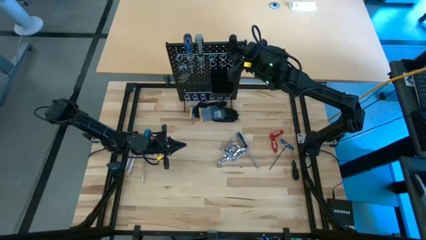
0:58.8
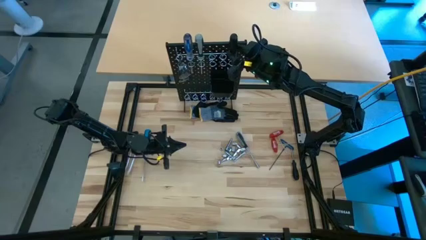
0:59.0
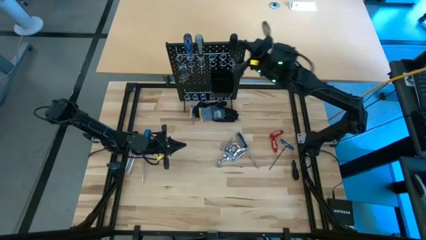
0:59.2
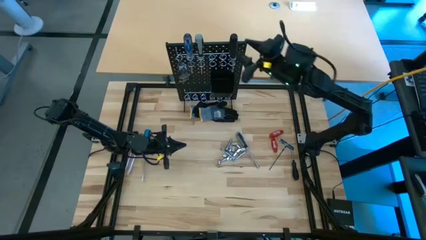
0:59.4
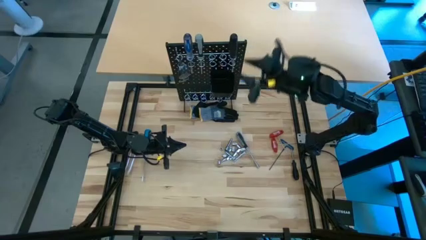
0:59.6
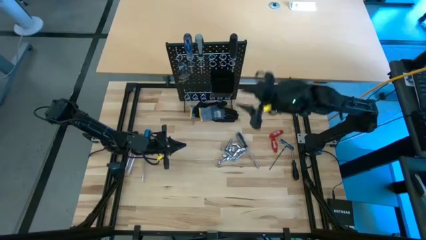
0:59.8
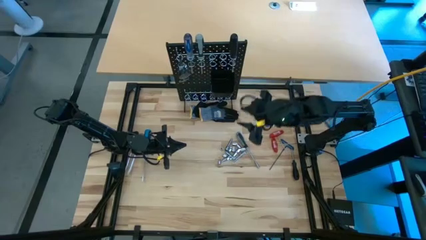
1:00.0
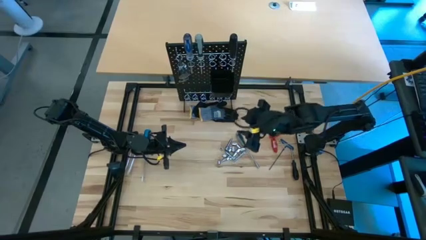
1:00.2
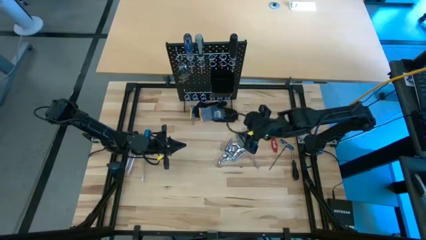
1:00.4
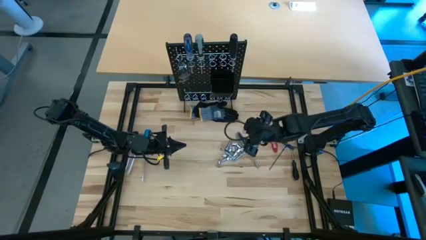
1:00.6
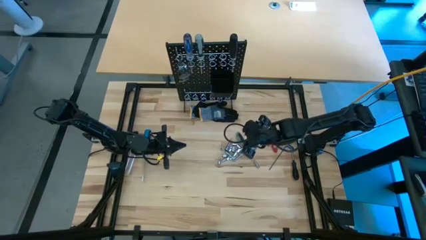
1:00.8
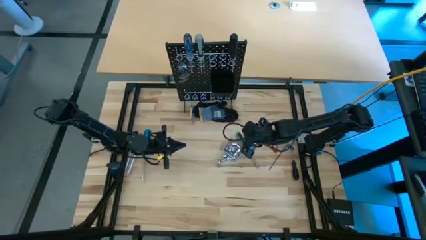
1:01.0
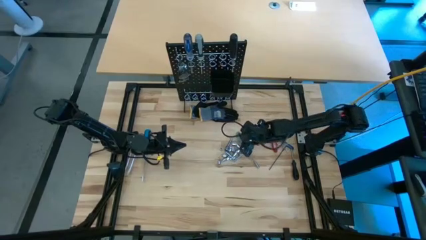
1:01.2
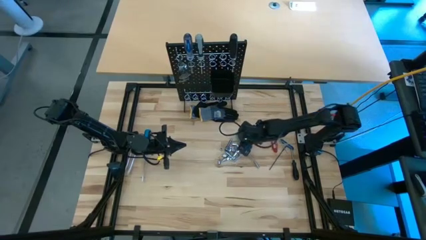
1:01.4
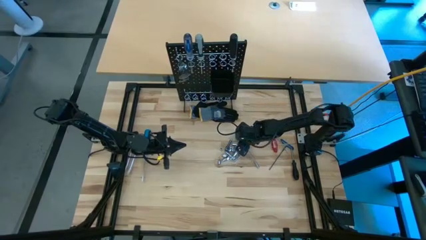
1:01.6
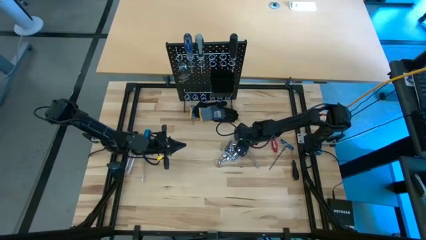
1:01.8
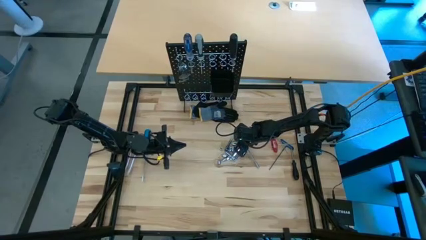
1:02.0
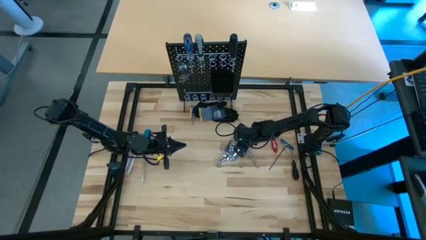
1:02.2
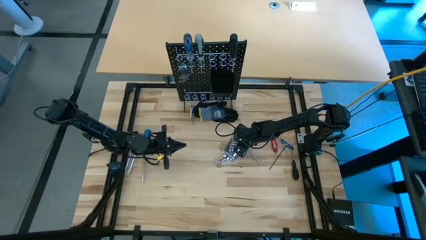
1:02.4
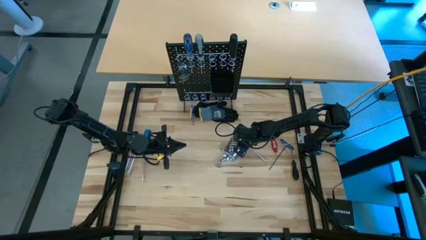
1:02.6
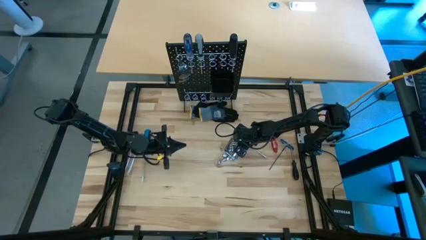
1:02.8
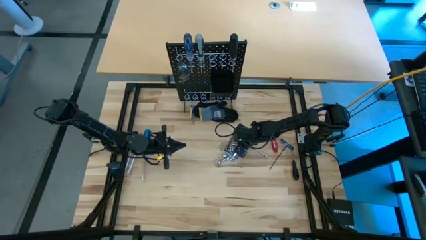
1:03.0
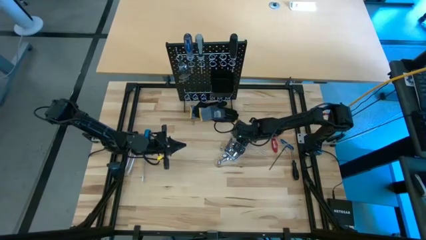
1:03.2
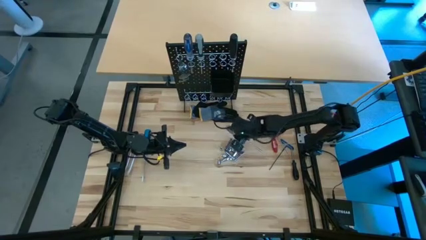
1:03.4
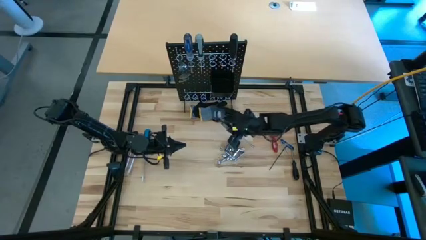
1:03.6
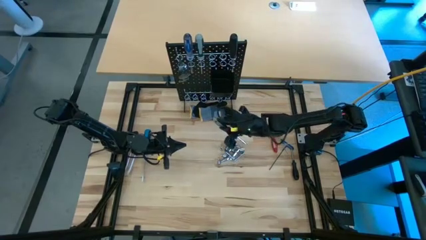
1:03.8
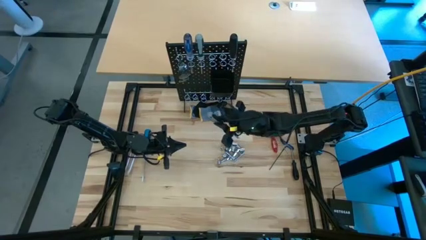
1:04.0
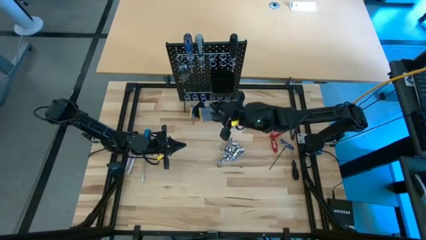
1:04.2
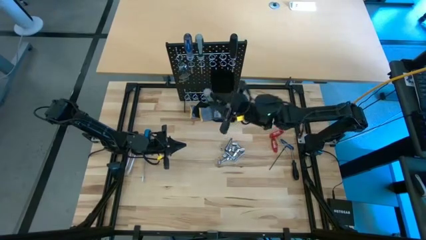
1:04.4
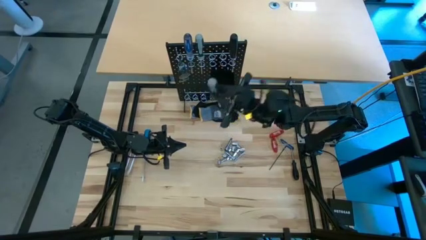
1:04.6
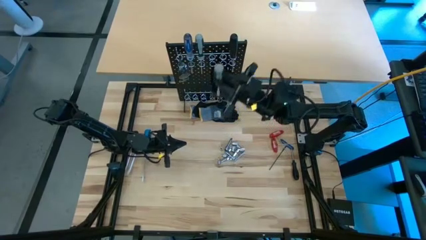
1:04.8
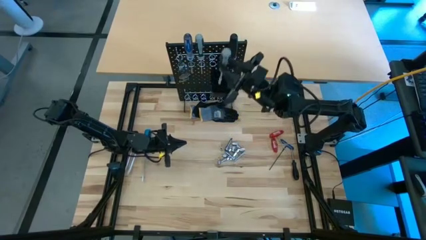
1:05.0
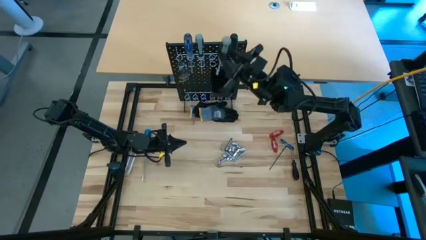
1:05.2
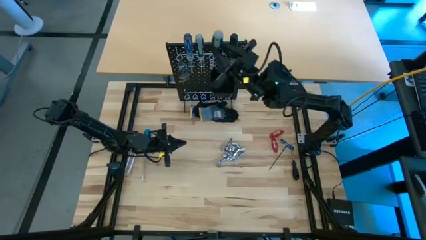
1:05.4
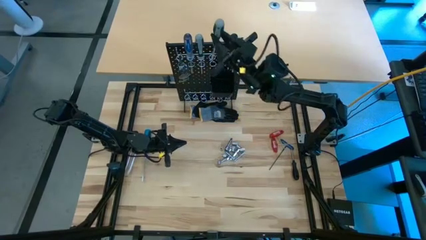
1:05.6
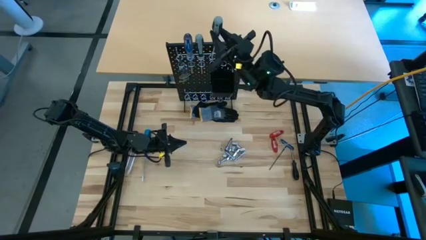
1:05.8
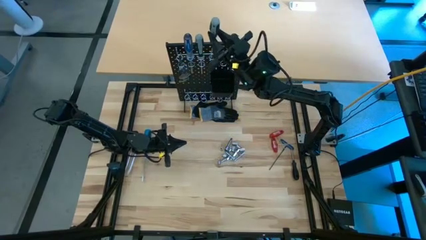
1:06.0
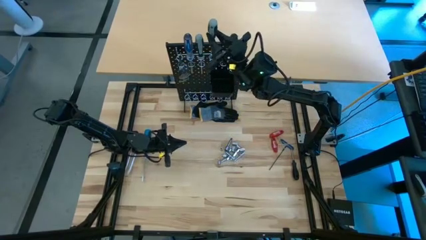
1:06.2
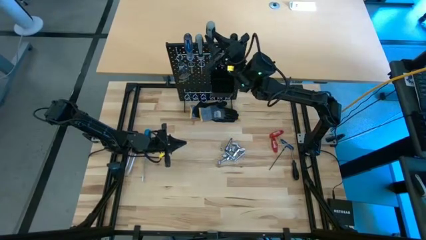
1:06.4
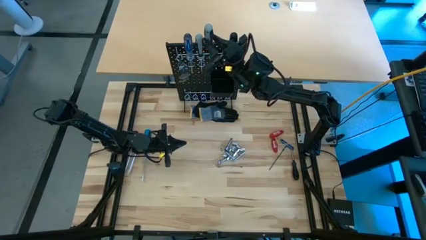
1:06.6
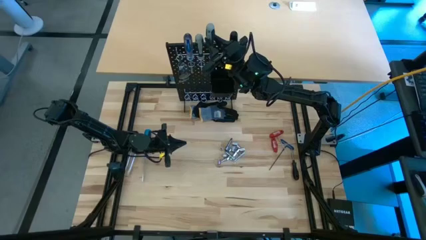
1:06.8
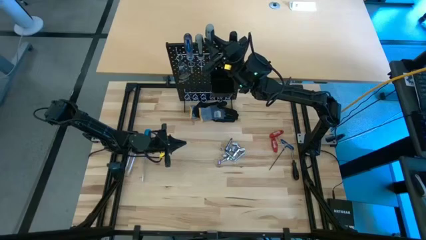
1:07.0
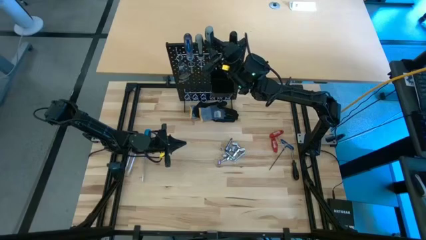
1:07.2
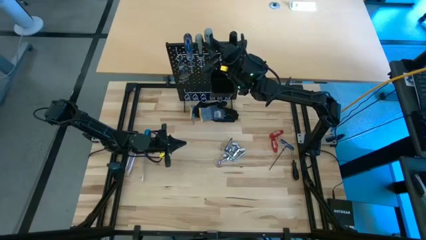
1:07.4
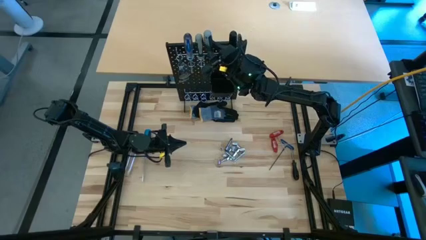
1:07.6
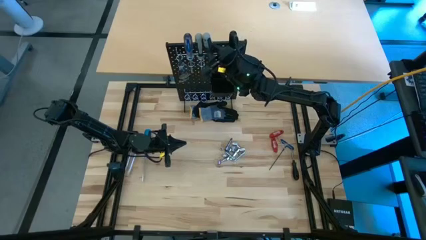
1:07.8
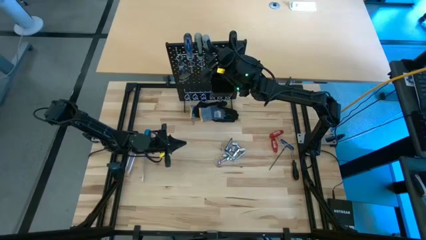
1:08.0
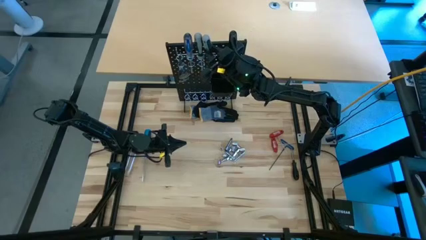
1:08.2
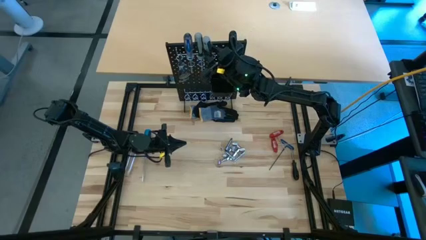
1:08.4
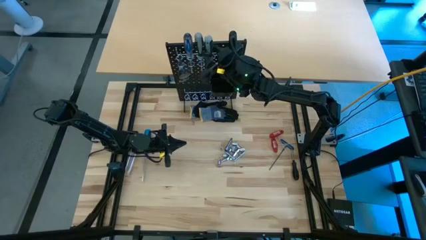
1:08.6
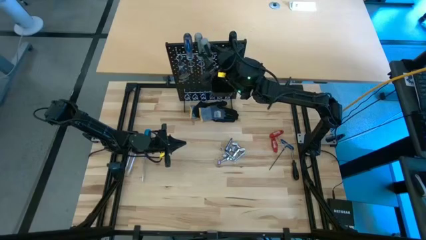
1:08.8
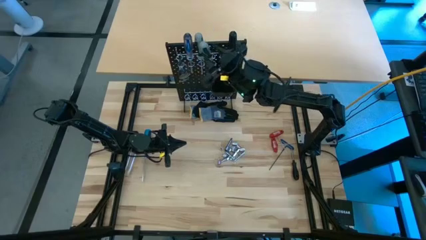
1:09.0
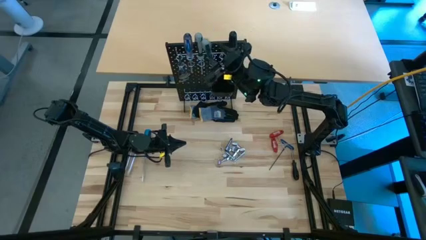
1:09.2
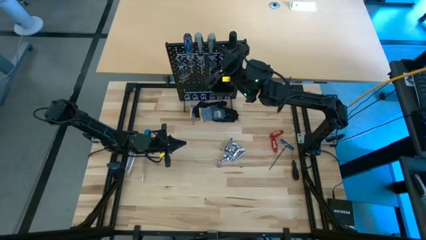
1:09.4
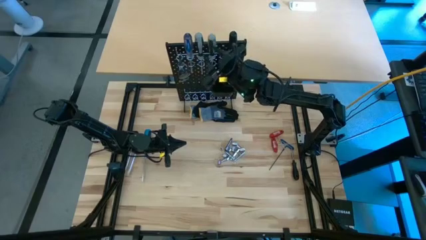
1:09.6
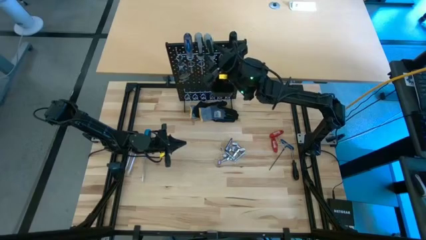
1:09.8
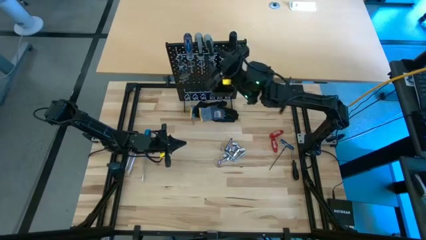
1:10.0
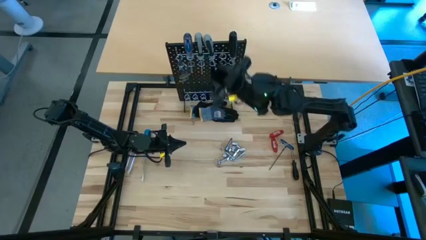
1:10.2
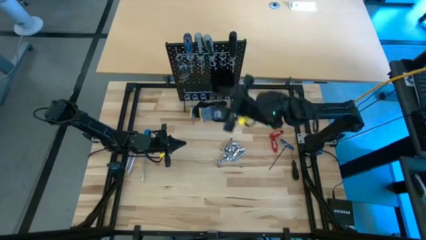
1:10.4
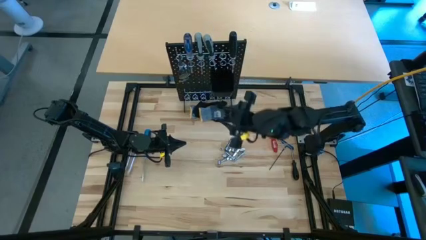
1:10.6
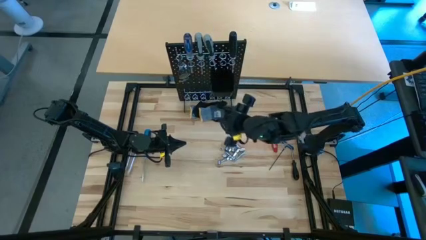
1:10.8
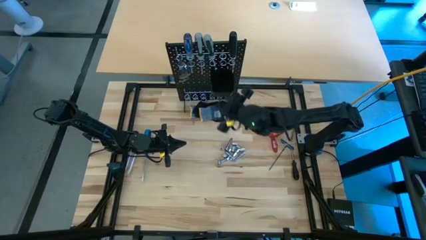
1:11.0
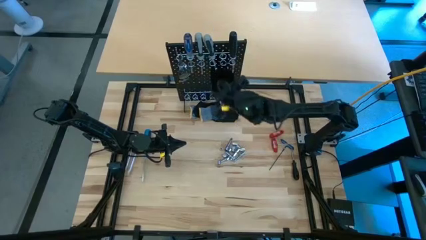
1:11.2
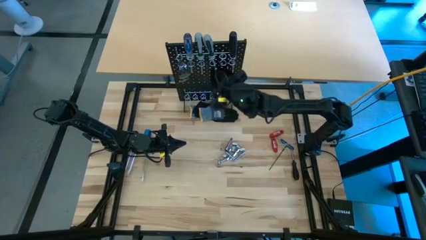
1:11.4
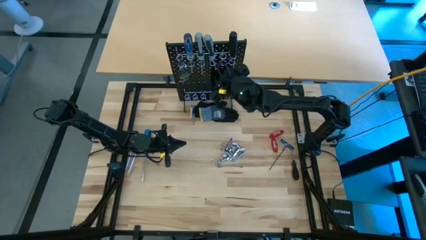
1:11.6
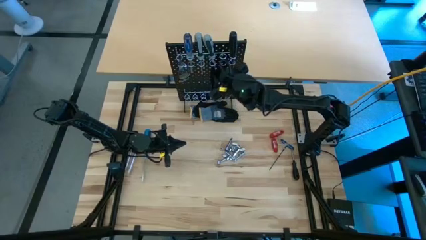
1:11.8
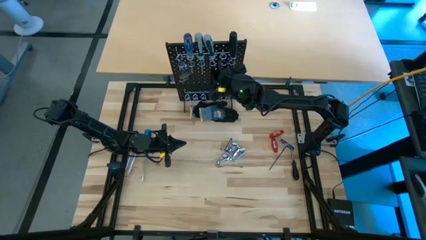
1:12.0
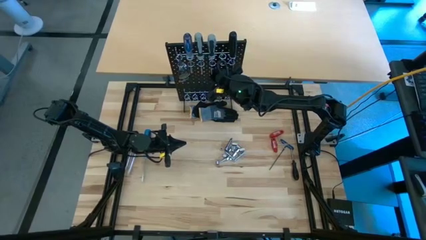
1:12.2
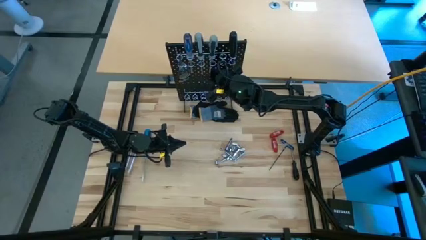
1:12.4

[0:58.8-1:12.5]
Task: Hang tools onto peg board
Hang the gray screwdriver on the pegboard

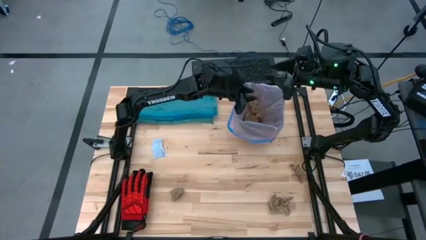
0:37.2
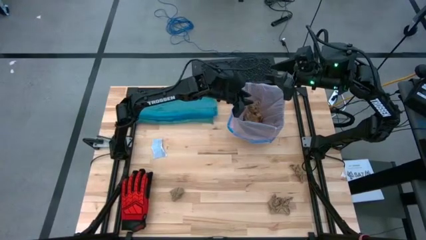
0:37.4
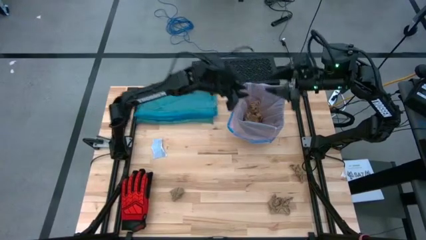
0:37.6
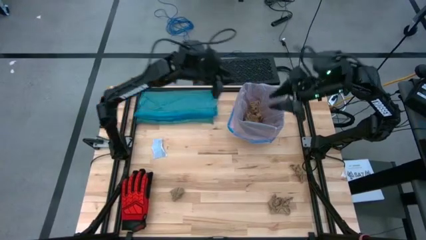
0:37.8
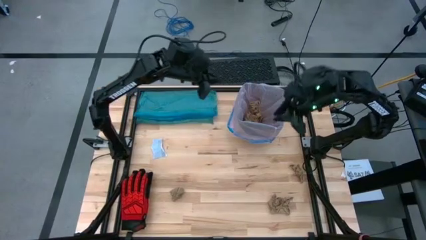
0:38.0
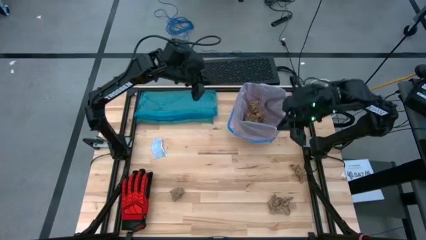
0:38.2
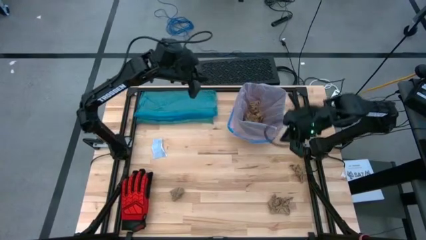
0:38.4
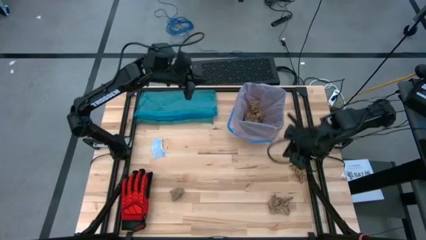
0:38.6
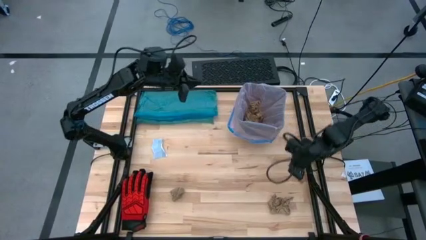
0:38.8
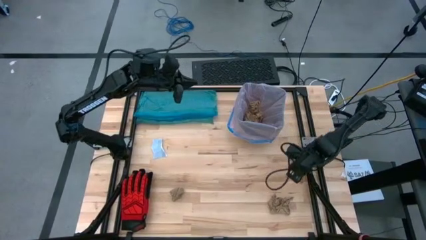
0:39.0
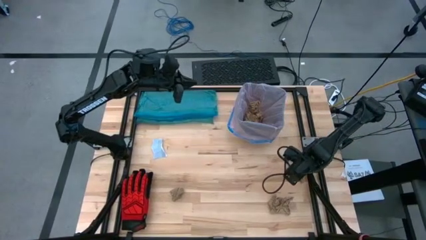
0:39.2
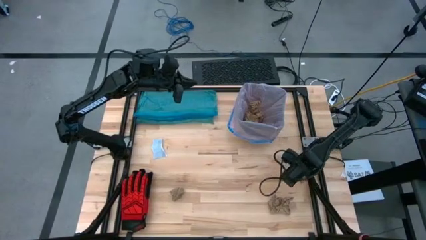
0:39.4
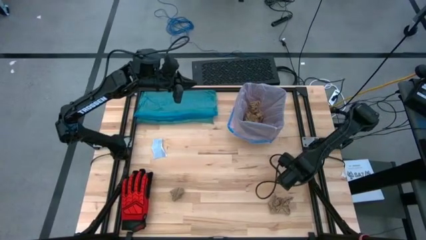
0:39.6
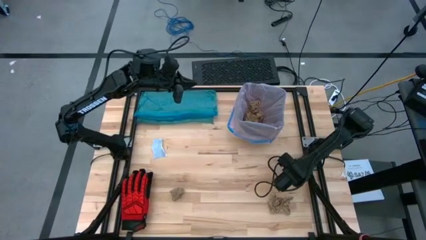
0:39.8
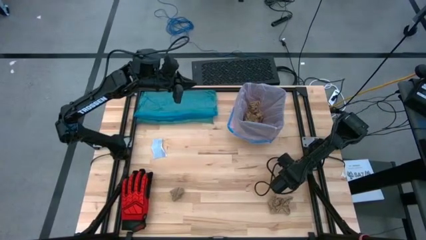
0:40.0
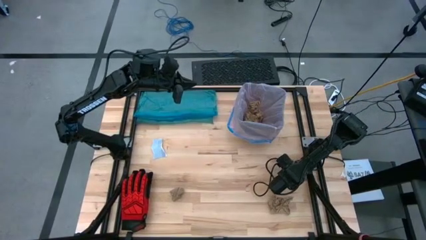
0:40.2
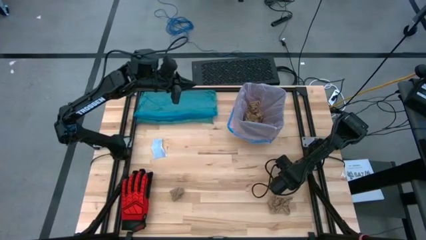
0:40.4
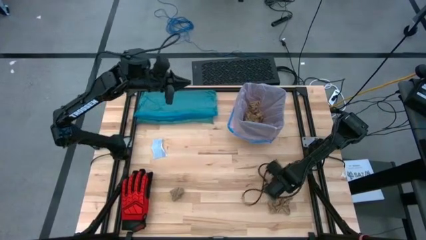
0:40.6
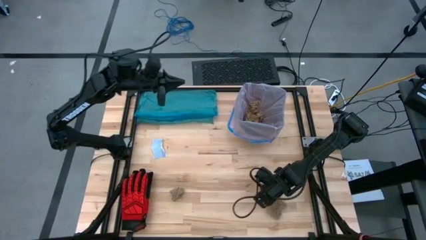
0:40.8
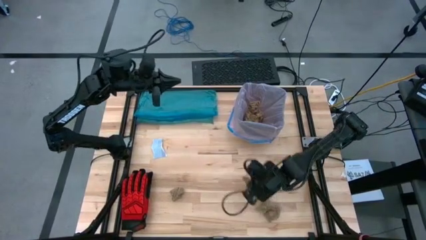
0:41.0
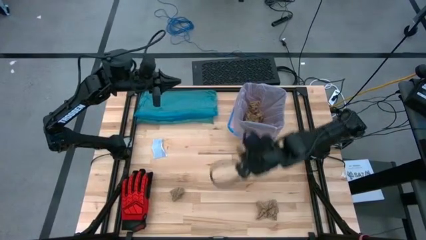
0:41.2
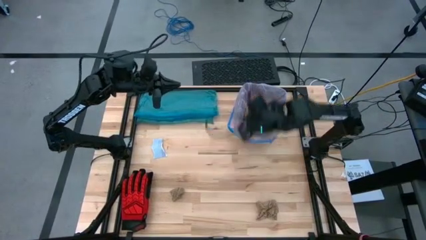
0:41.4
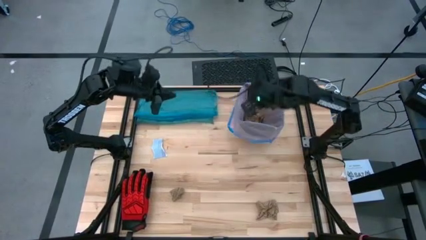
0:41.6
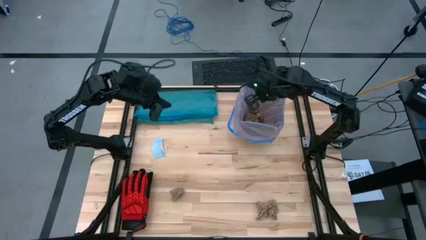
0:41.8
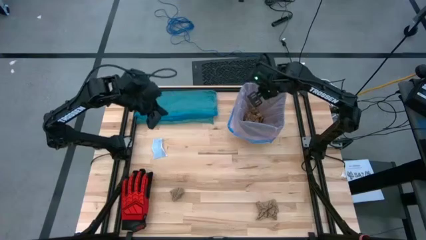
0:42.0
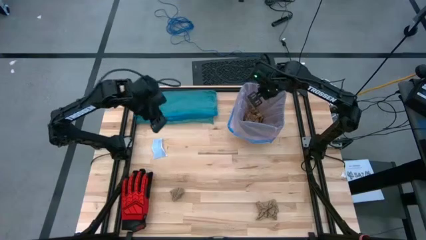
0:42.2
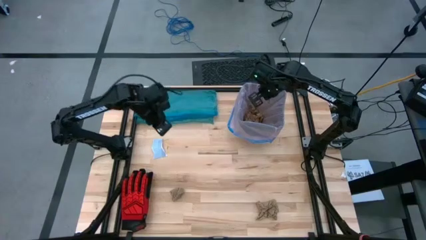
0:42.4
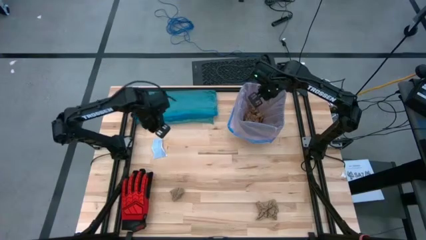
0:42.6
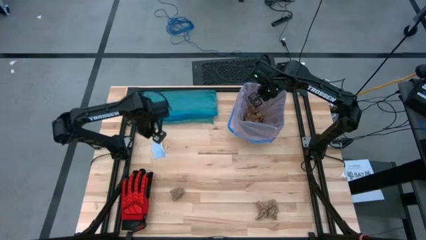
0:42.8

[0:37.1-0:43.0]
Task: place trash/remove bag and relplace
Put the brown napkin into the trash bin
